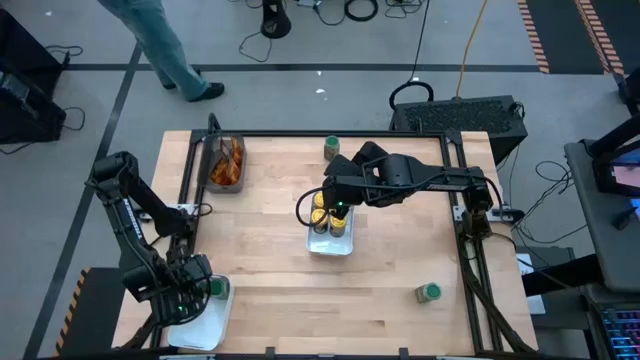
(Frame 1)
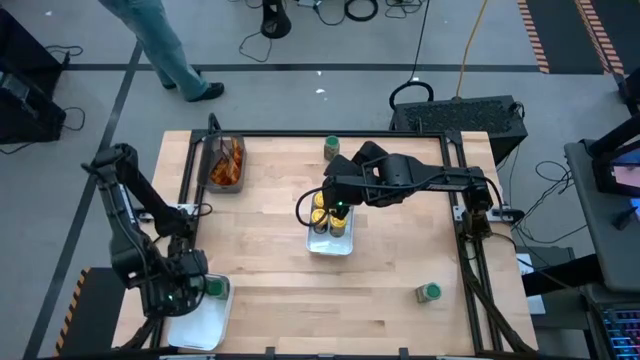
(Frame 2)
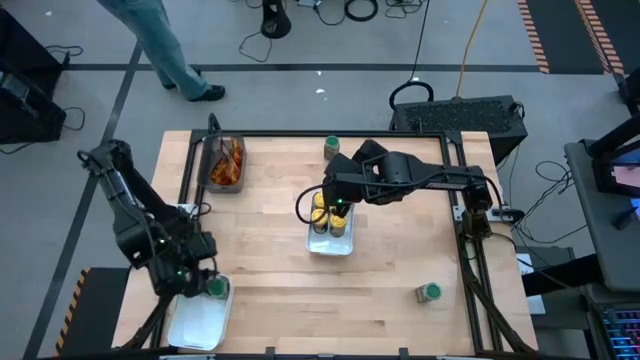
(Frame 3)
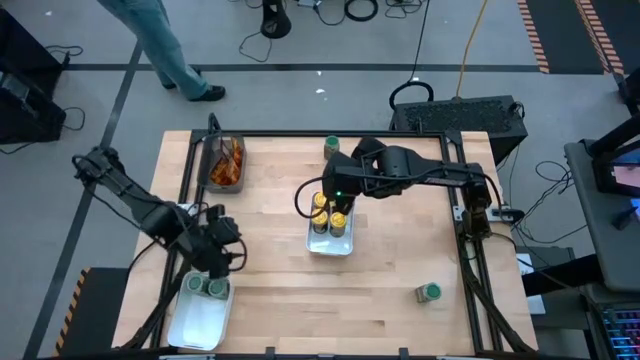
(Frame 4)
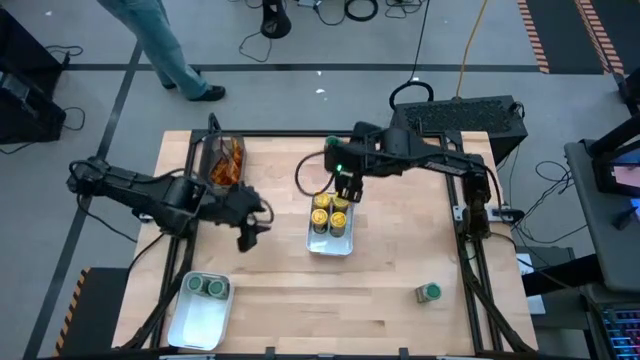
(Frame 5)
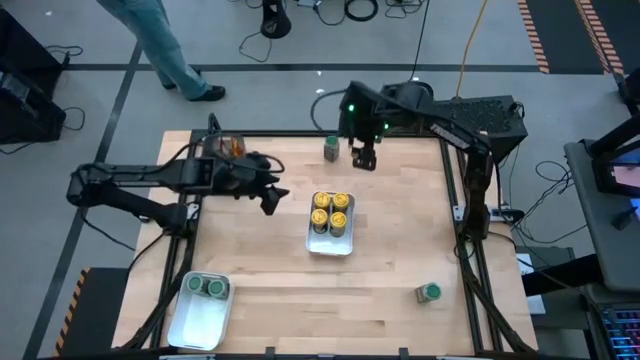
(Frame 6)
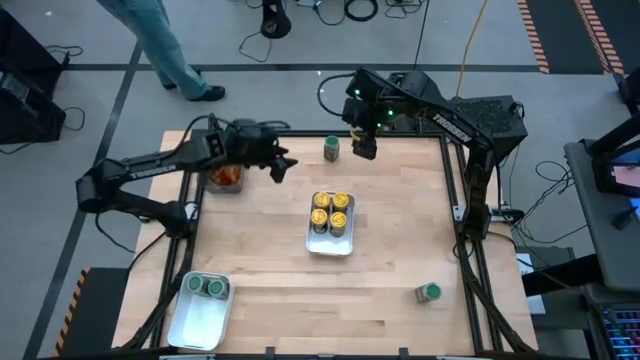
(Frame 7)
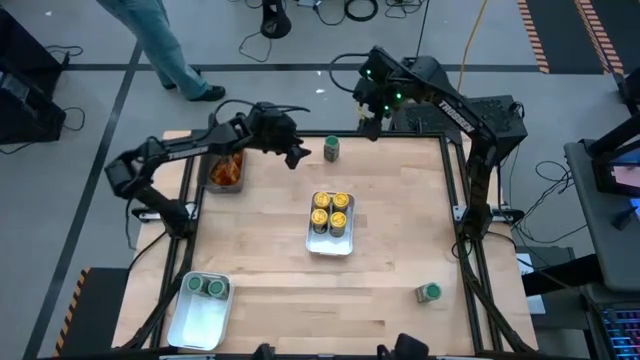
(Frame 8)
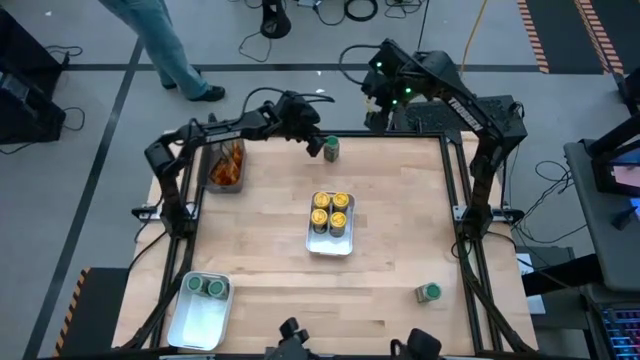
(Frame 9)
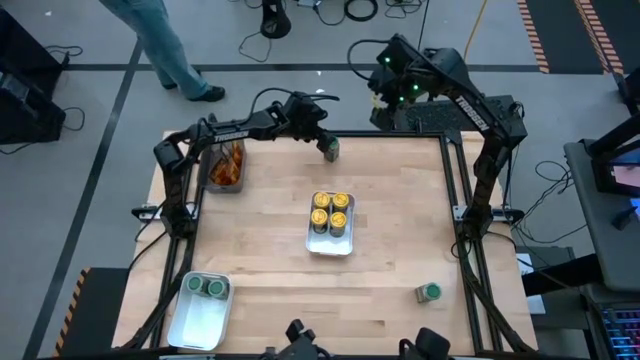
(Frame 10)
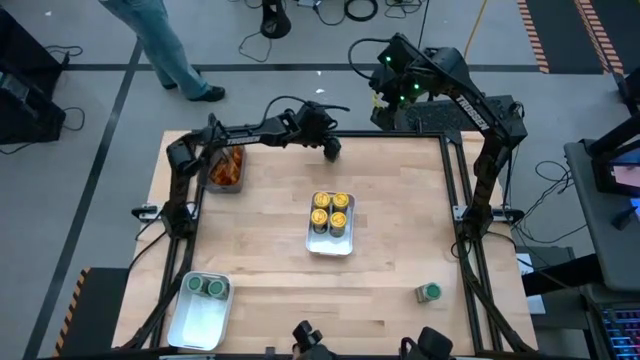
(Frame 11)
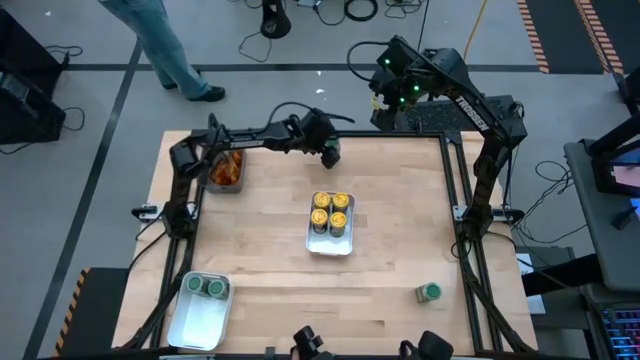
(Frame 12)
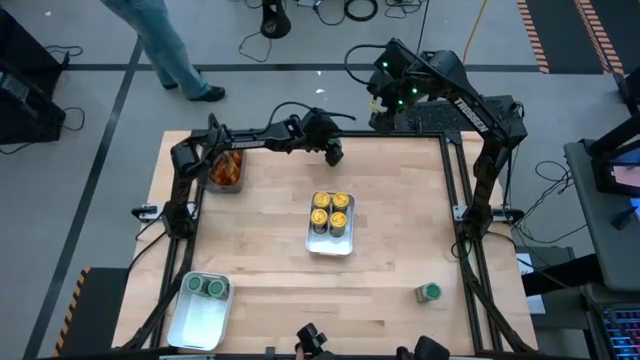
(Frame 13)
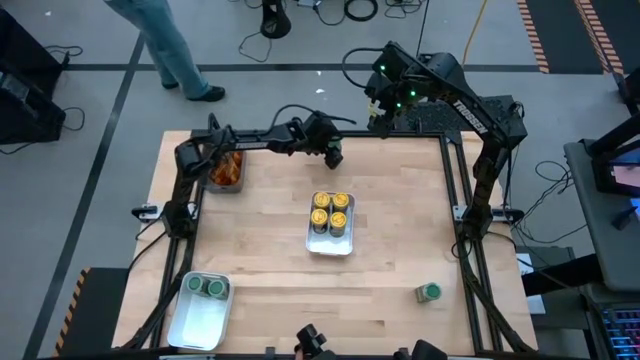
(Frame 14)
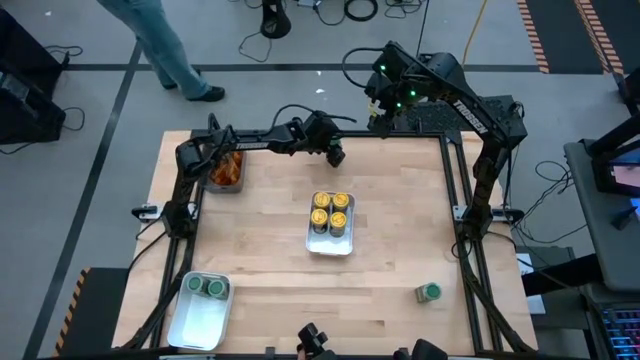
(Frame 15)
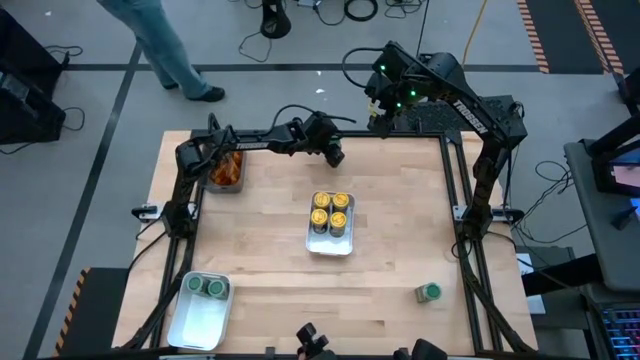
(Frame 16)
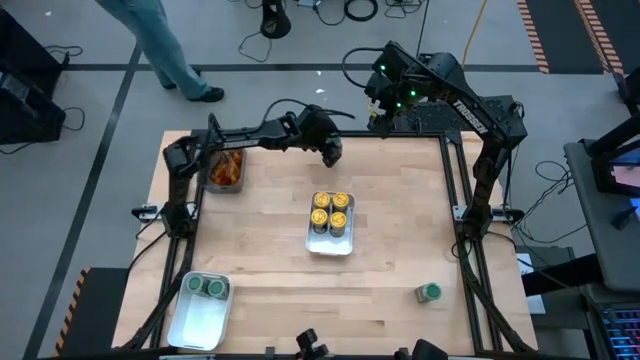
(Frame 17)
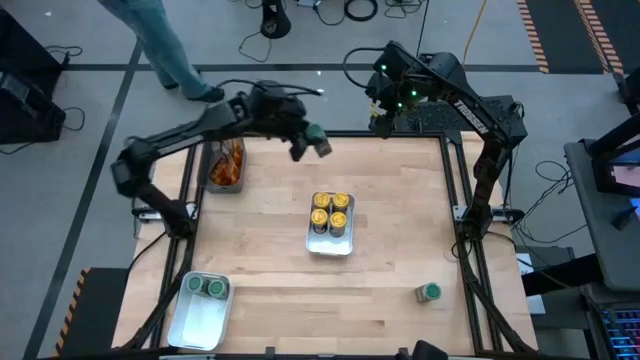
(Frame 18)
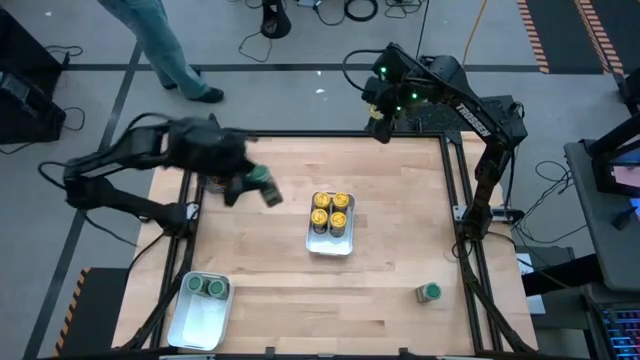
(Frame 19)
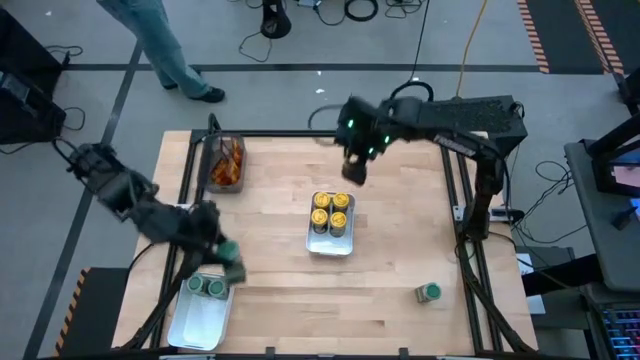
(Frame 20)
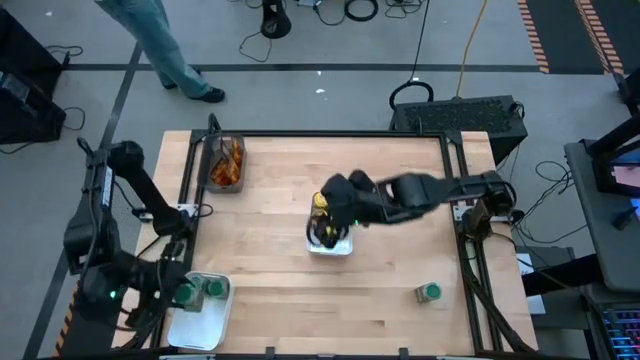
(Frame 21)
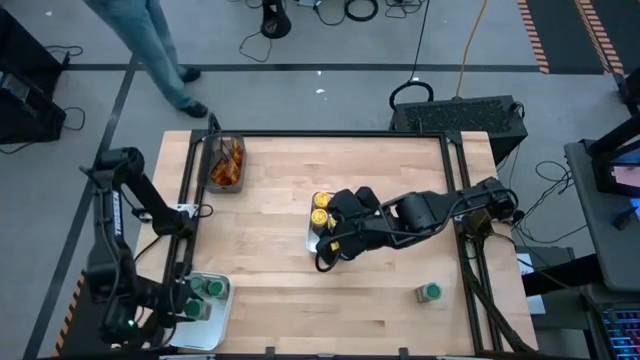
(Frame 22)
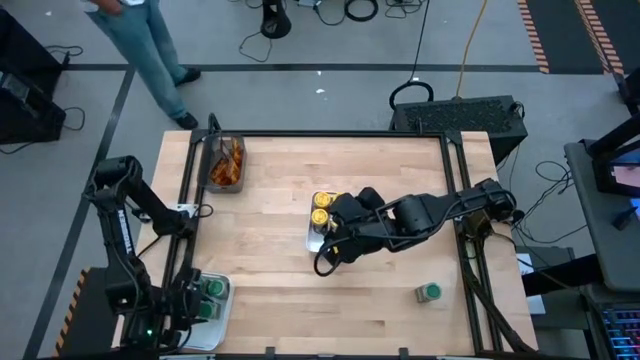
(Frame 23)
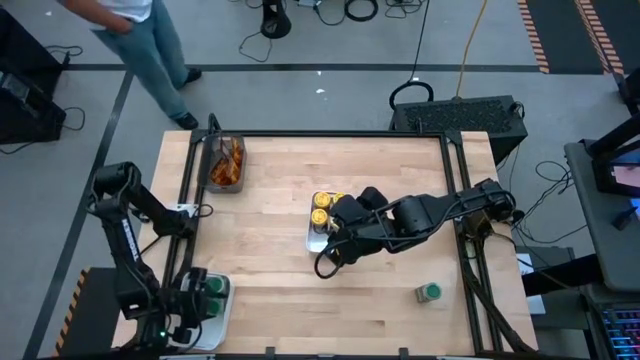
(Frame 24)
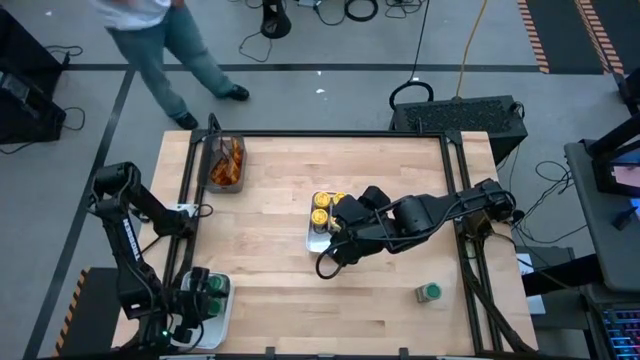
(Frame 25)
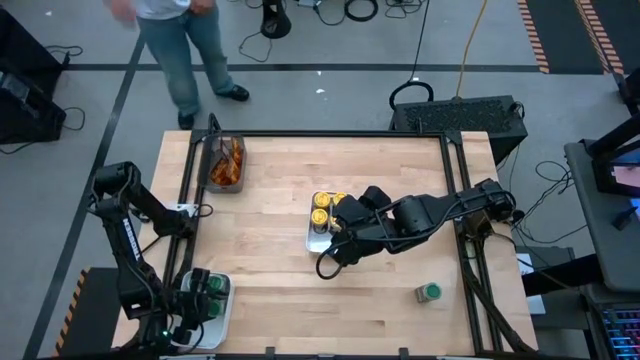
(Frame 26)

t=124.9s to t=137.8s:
Task: Sort spices by type
Put the top green spice bottle into the bottom white bin
